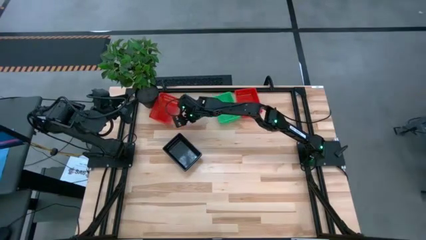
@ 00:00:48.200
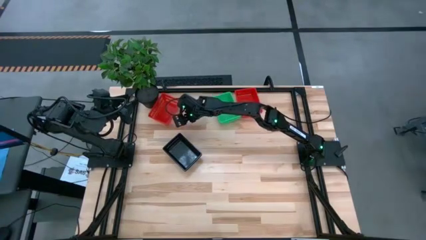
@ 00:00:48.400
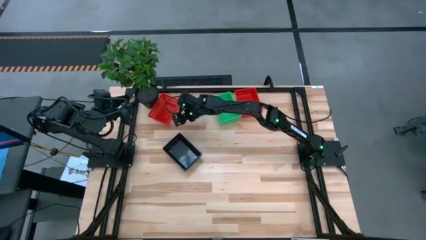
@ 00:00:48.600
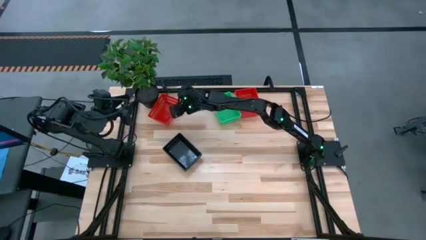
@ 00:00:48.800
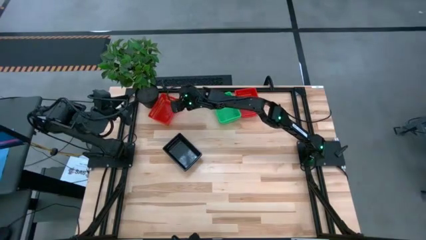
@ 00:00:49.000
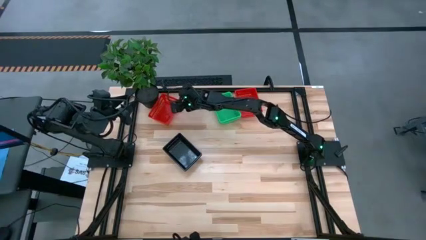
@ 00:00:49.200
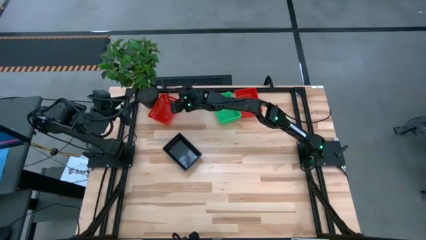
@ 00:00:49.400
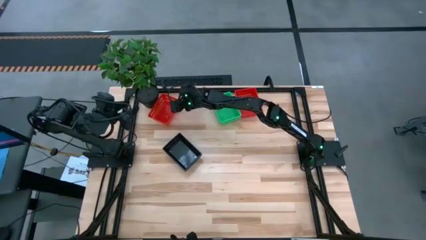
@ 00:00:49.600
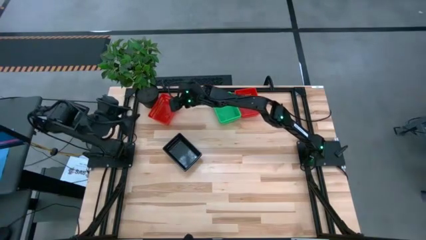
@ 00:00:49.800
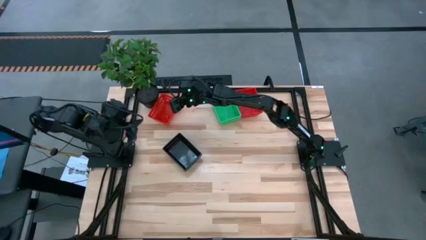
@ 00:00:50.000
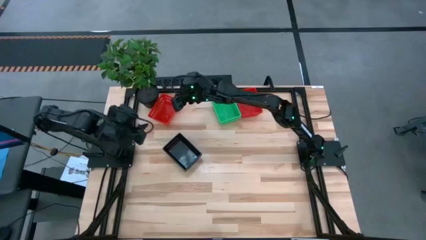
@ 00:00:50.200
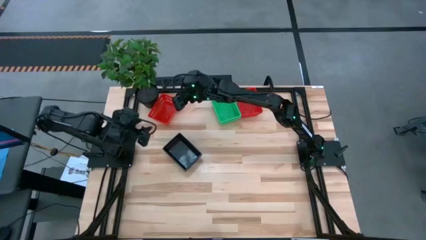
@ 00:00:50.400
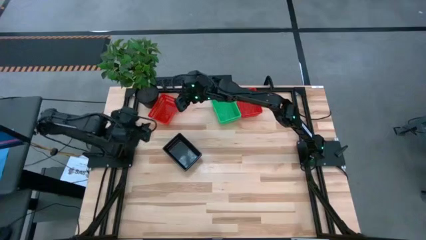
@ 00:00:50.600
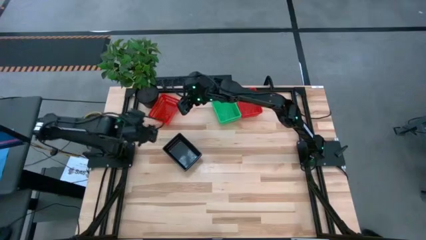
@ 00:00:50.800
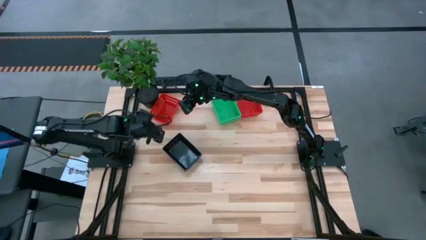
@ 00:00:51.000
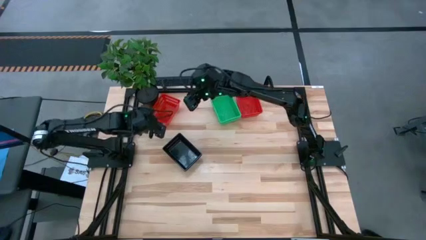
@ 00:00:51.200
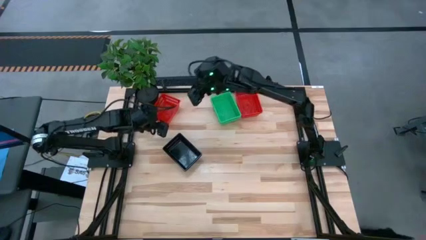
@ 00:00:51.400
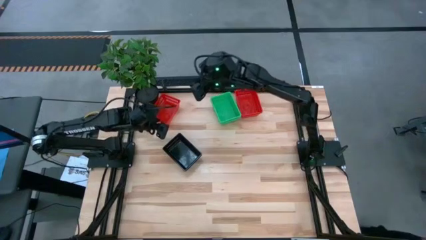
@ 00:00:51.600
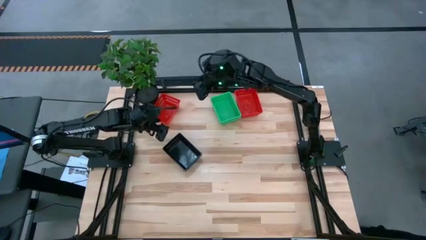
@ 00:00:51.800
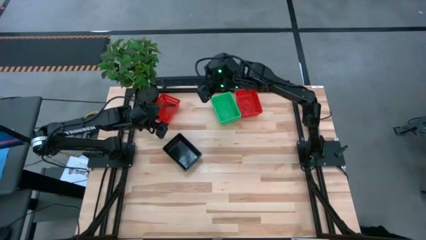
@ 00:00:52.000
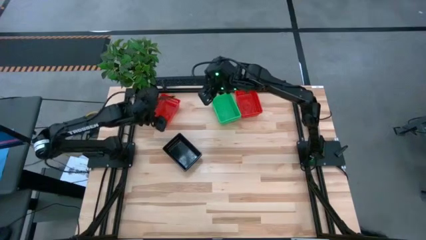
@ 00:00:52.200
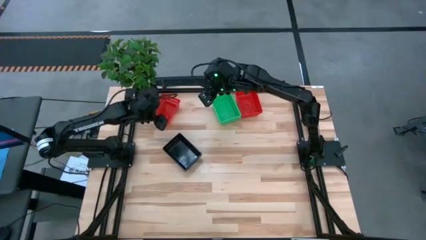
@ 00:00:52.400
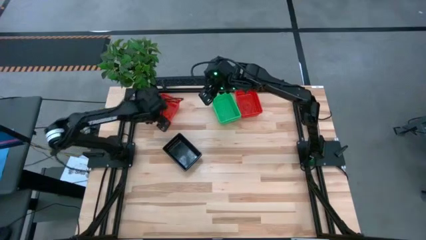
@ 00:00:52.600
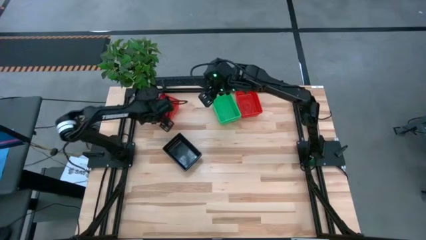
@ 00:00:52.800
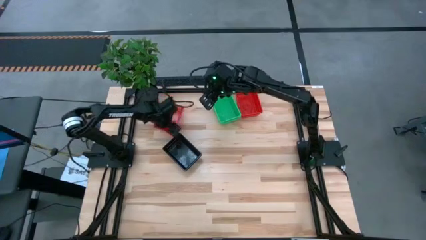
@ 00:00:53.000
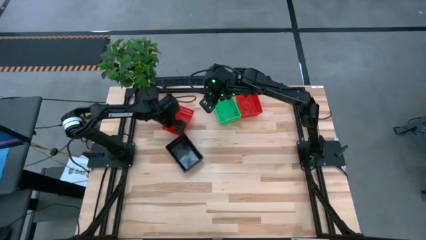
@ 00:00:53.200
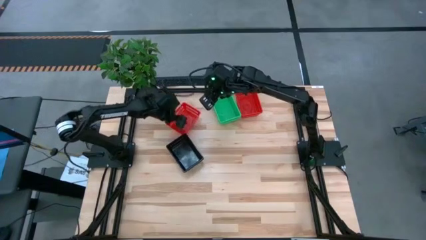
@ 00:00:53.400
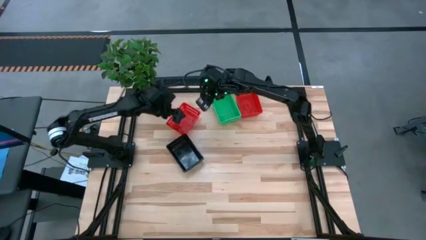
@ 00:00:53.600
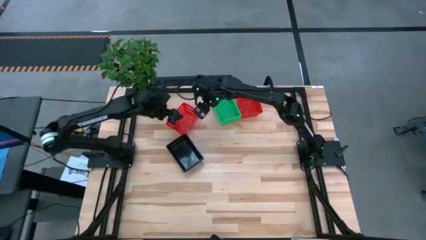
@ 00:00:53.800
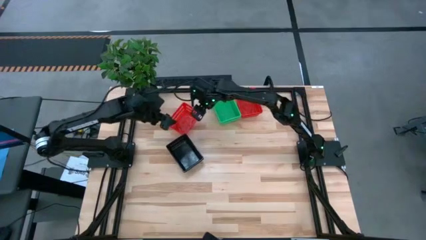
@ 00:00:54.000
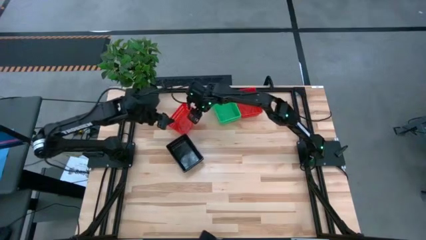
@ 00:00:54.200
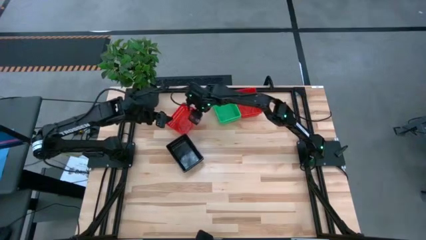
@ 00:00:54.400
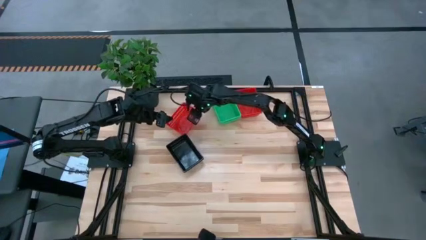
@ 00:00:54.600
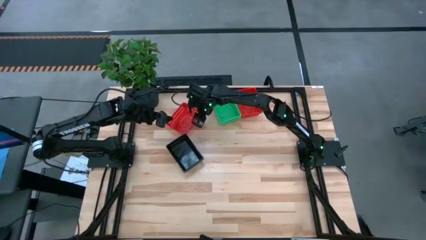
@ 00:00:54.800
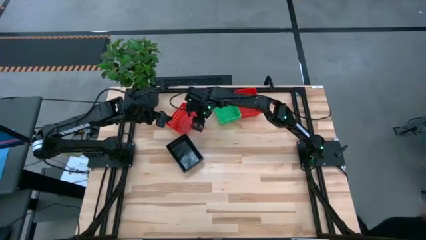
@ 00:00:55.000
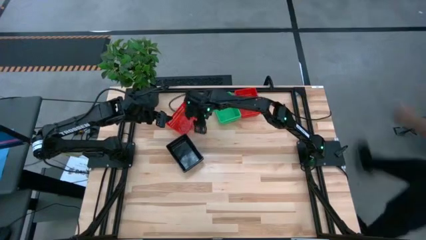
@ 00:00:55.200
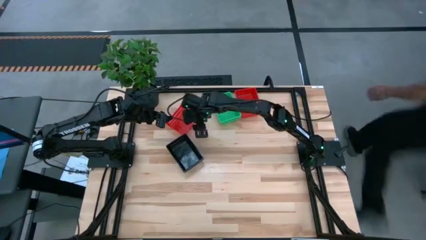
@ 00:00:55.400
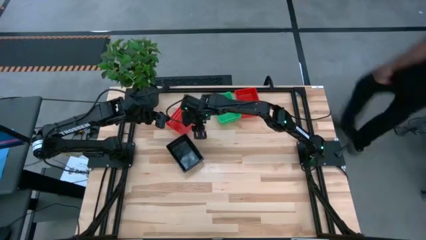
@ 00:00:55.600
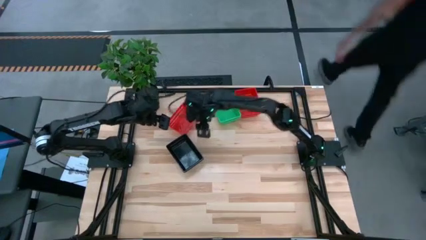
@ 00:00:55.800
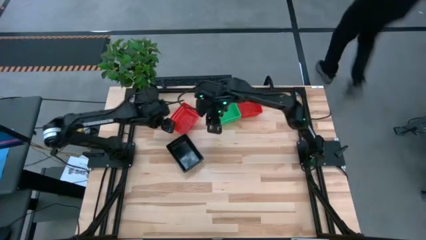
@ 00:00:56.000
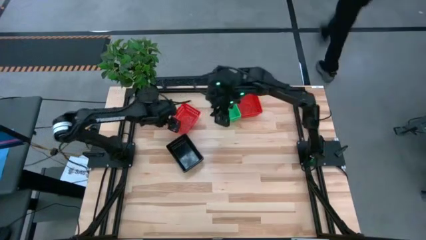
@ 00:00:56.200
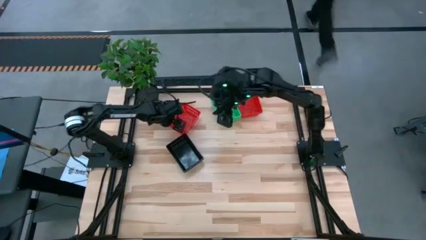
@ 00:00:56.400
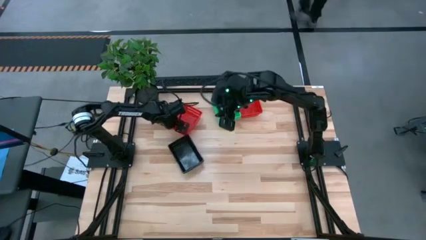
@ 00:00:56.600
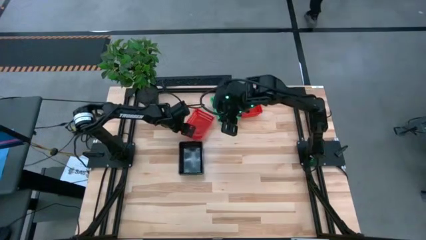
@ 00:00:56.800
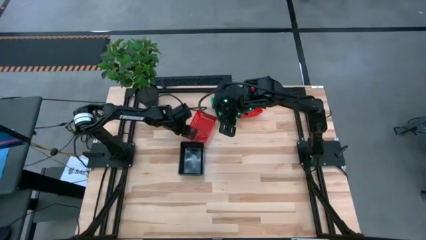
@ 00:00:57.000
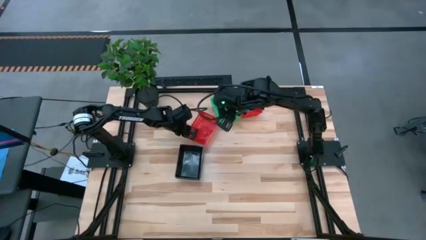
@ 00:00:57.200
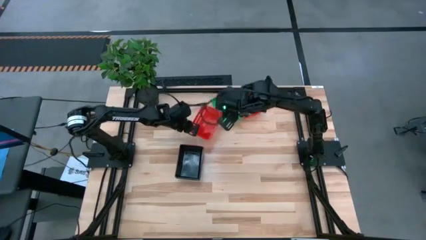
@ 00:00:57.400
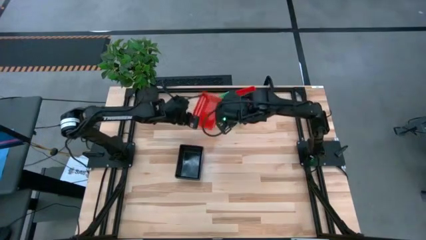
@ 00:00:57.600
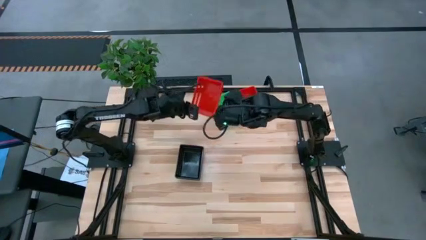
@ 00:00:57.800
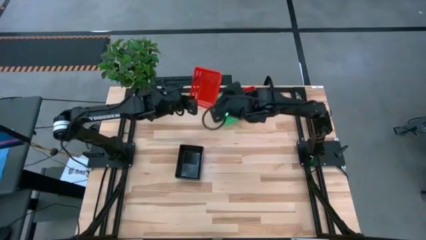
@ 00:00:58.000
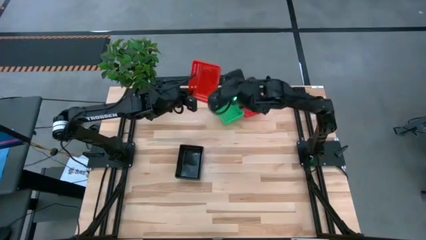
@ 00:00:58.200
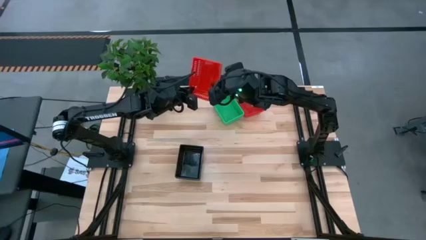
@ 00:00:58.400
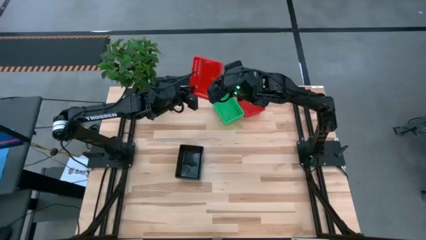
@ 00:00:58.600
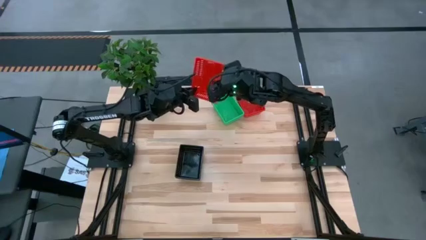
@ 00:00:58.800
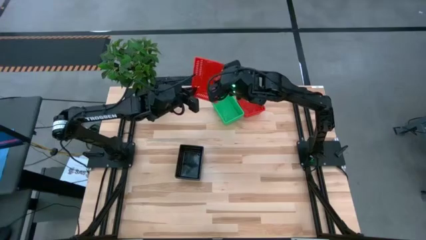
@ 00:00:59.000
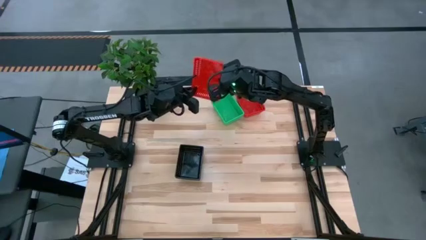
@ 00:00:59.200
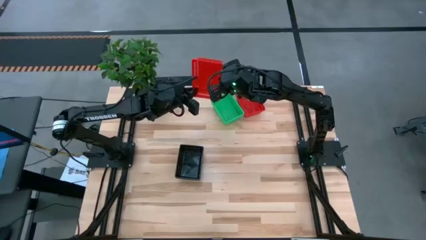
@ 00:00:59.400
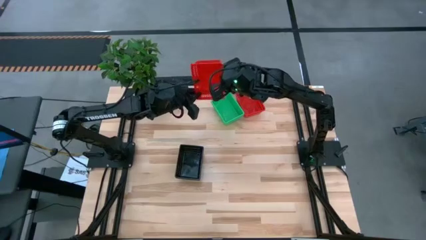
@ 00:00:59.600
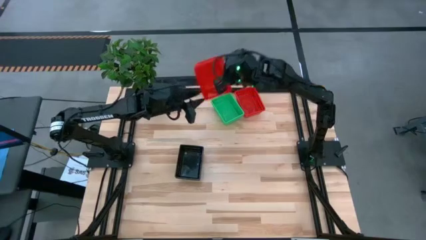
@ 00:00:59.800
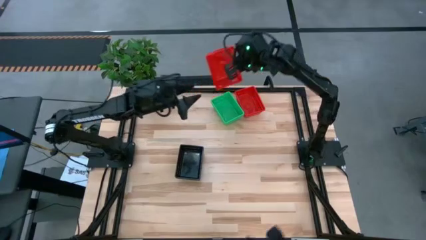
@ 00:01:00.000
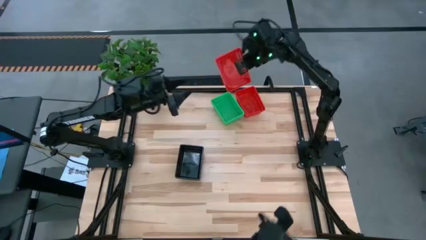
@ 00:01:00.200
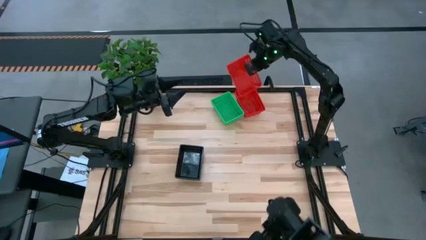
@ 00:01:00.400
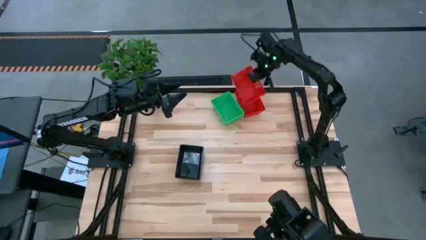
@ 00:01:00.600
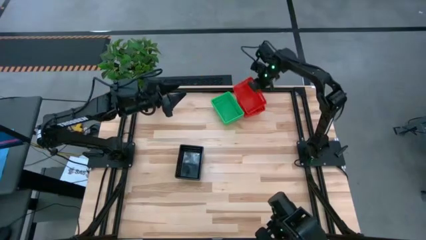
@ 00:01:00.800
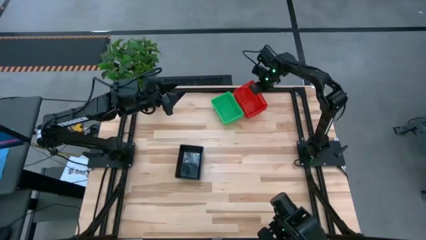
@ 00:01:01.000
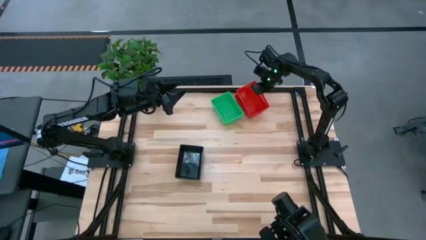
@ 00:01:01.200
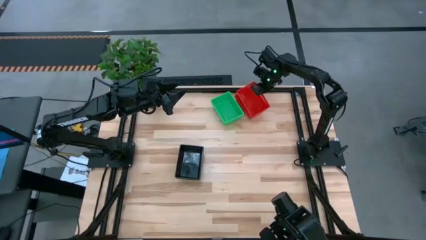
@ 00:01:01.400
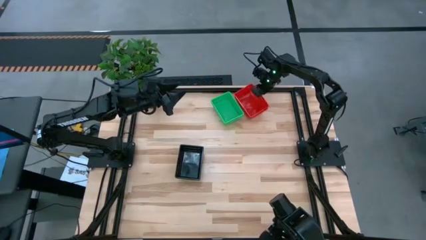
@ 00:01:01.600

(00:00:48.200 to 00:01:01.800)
Stack the left red bin on the stacked red bins

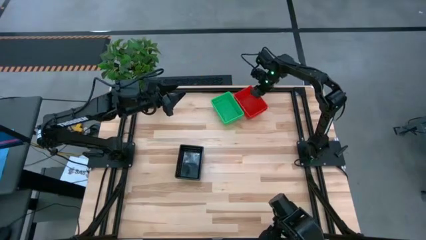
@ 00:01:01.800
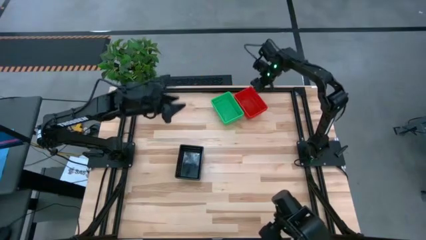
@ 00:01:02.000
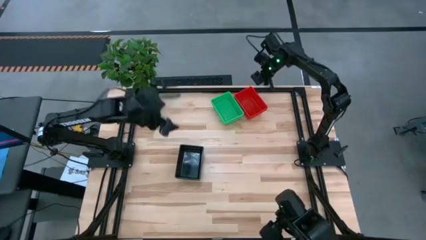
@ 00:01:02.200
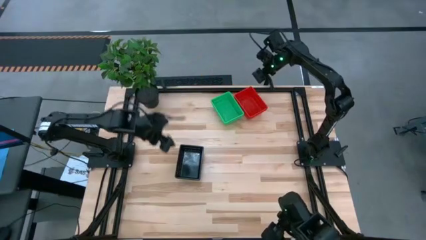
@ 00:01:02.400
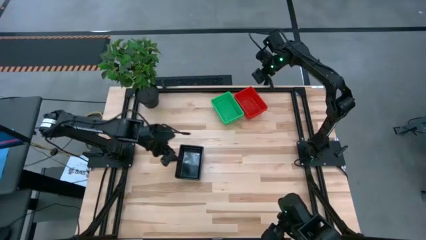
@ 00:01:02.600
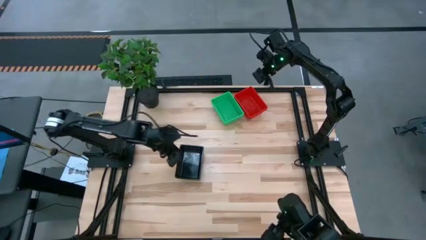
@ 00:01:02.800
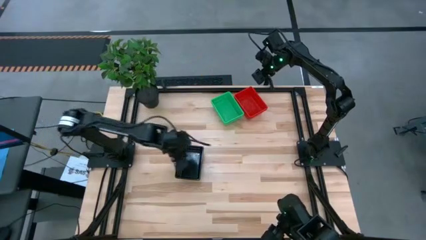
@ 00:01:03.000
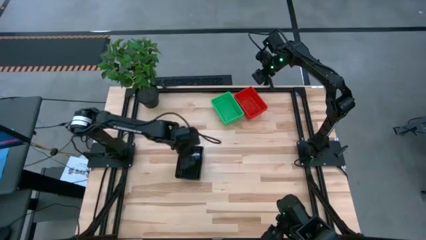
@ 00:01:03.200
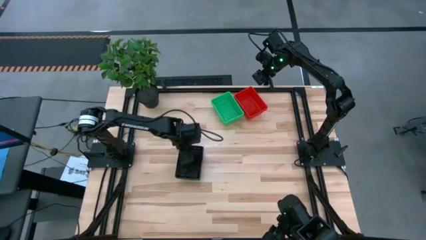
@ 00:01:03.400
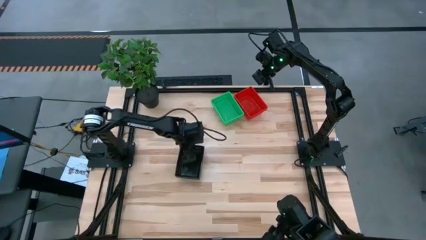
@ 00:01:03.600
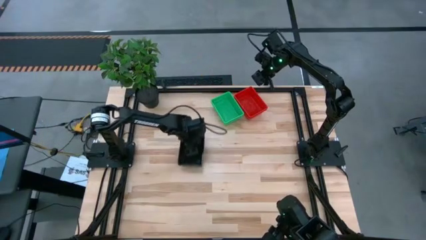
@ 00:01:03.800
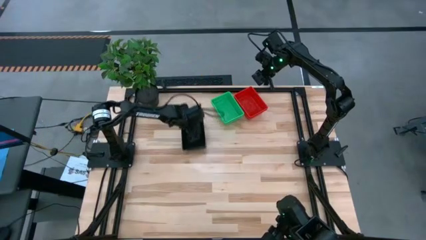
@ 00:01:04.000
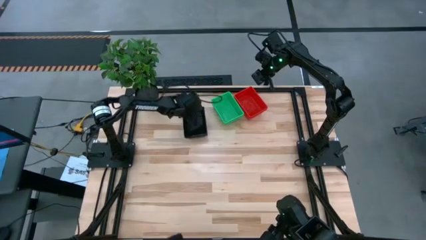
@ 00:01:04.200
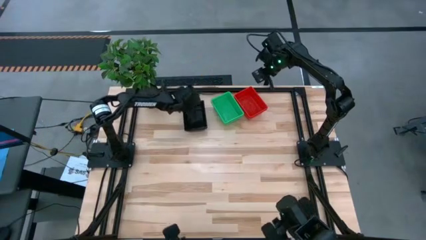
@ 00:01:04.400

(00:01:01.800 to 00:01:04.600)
Move the stacked black bins beside the stacked green bins

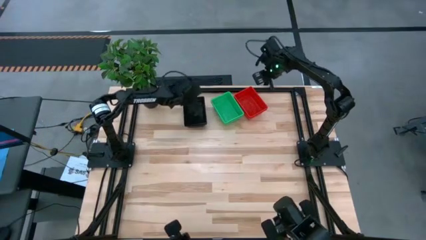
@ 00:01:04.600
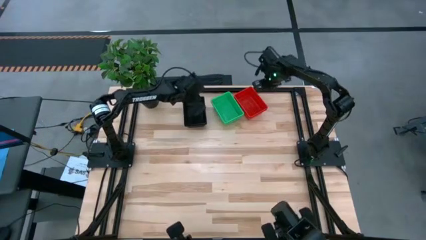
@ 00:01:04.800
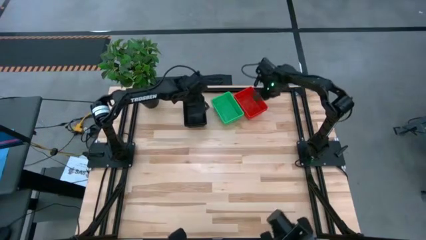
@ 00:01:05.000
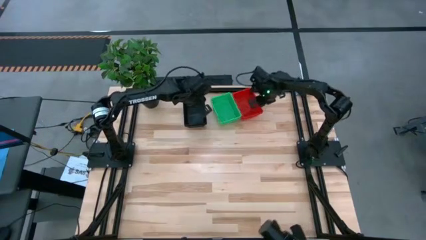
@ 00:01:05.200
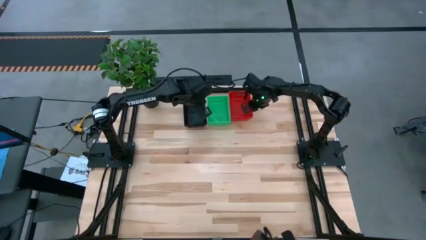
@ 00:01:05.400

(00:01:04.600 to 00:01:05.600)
Adjust the bins
